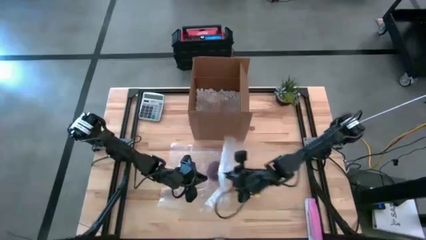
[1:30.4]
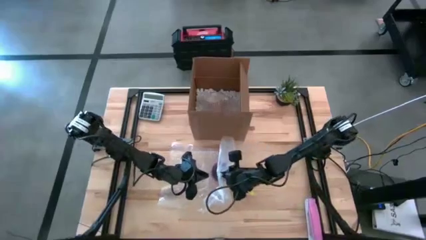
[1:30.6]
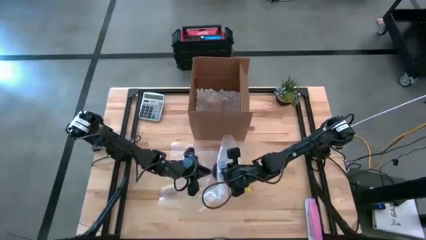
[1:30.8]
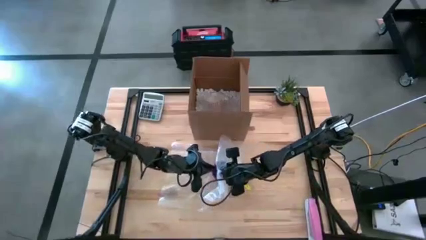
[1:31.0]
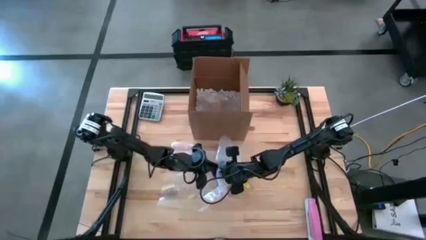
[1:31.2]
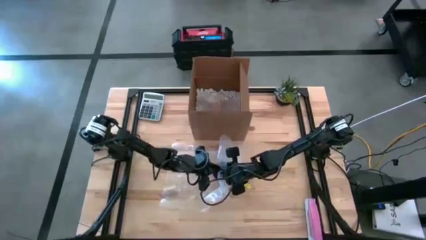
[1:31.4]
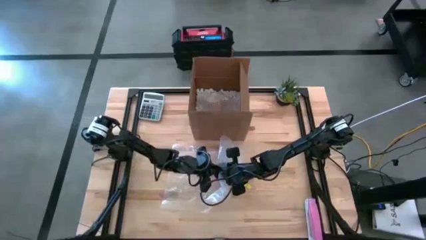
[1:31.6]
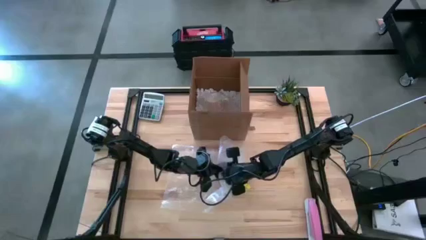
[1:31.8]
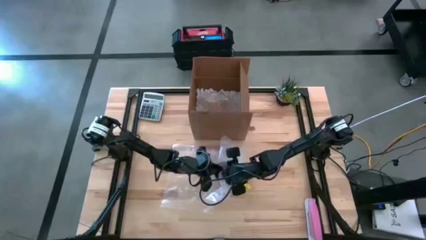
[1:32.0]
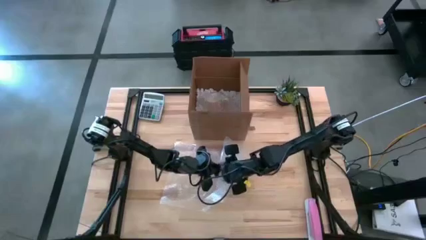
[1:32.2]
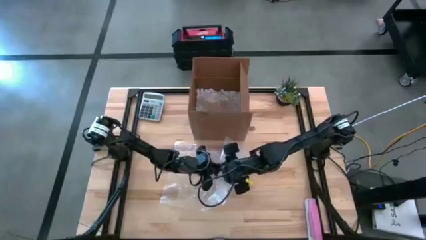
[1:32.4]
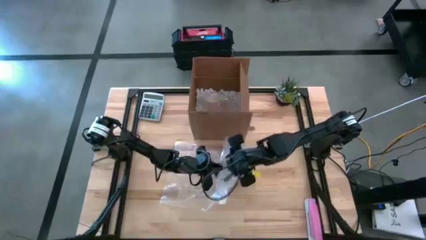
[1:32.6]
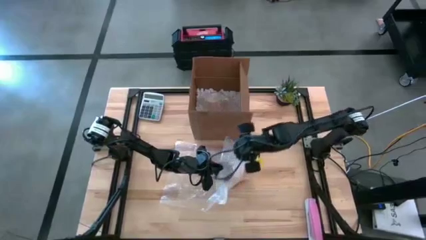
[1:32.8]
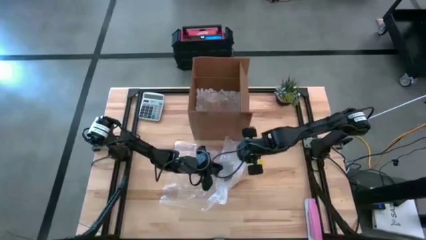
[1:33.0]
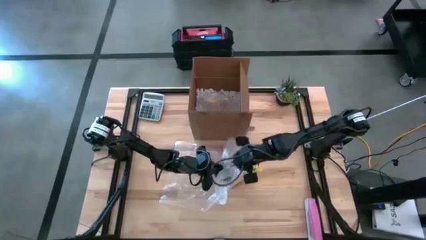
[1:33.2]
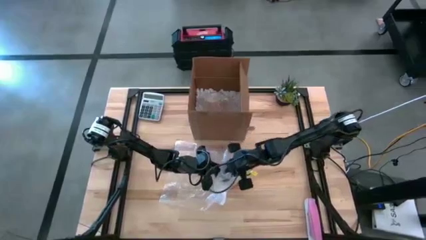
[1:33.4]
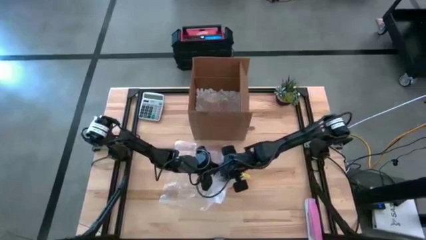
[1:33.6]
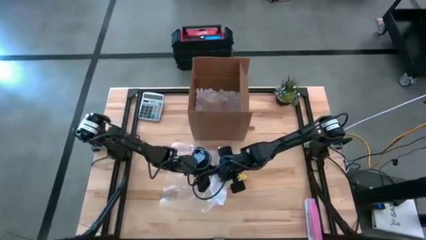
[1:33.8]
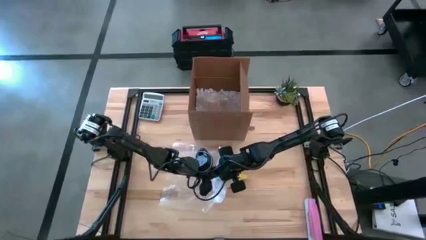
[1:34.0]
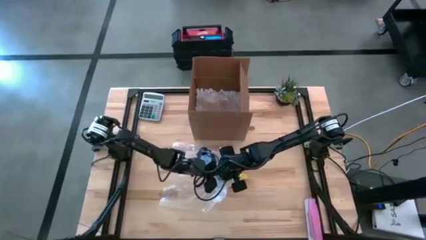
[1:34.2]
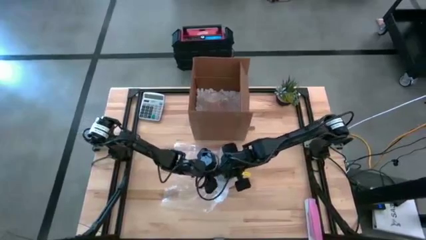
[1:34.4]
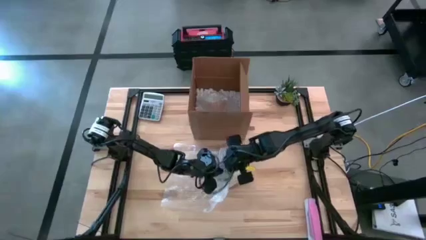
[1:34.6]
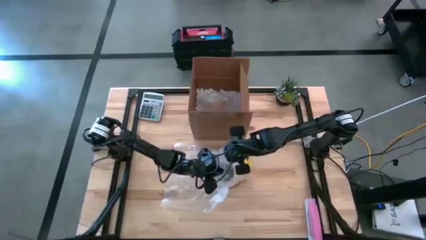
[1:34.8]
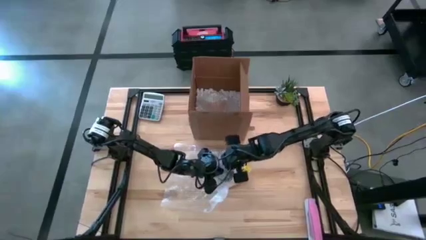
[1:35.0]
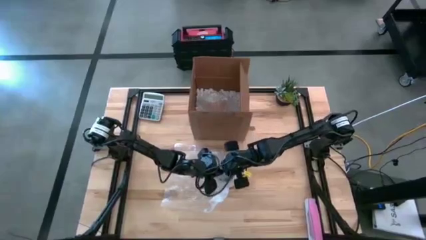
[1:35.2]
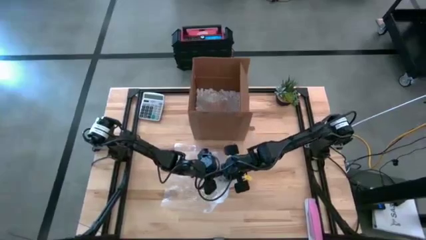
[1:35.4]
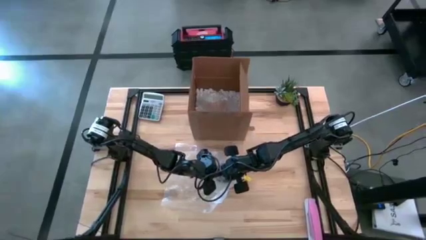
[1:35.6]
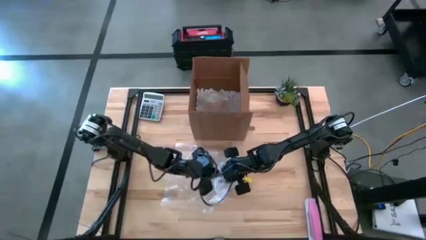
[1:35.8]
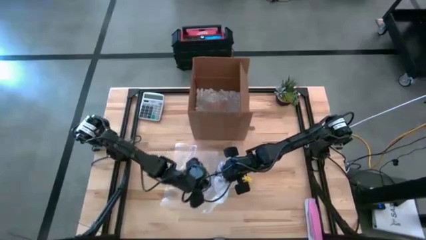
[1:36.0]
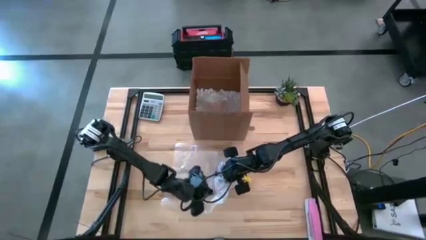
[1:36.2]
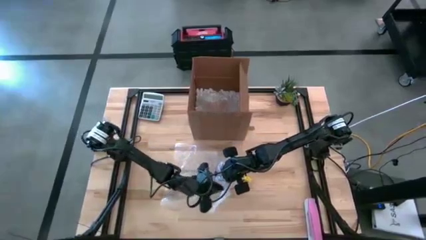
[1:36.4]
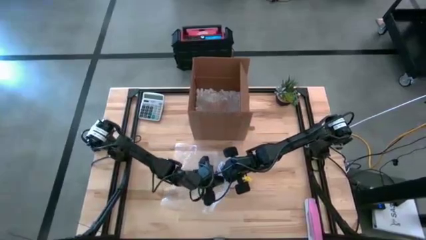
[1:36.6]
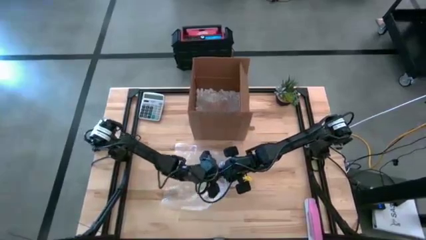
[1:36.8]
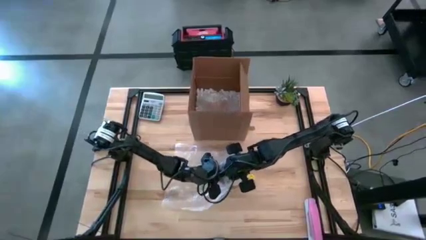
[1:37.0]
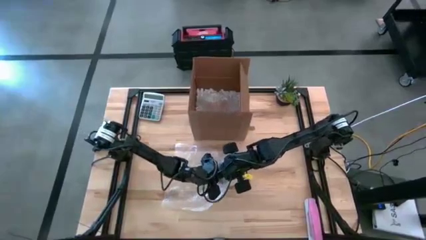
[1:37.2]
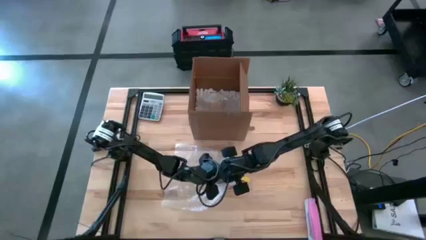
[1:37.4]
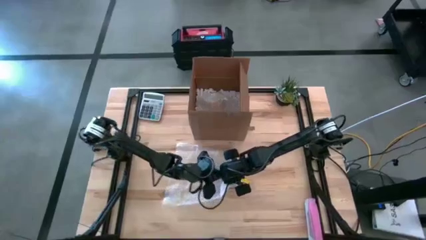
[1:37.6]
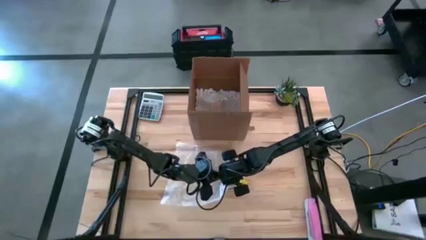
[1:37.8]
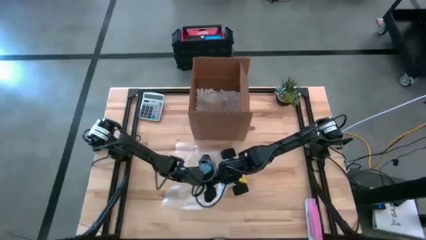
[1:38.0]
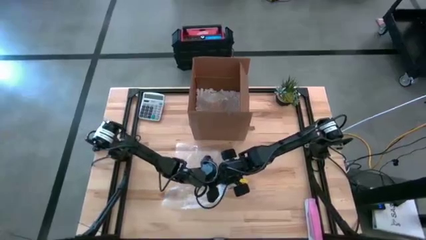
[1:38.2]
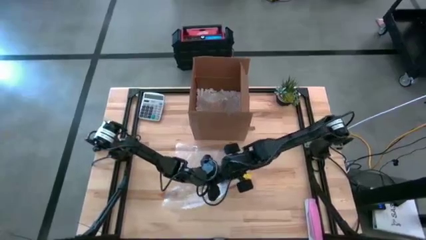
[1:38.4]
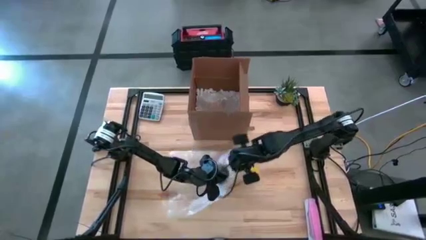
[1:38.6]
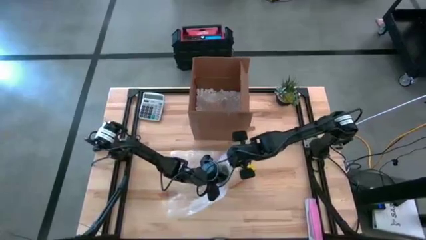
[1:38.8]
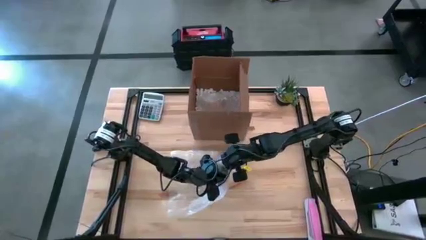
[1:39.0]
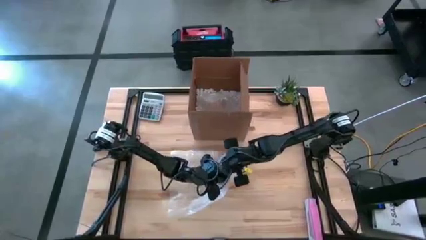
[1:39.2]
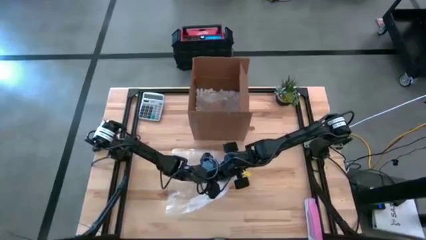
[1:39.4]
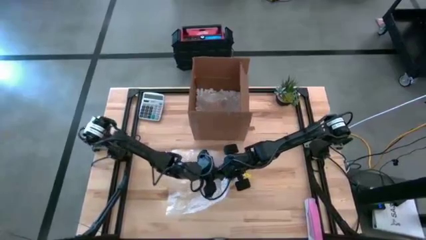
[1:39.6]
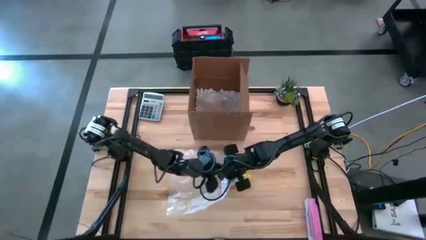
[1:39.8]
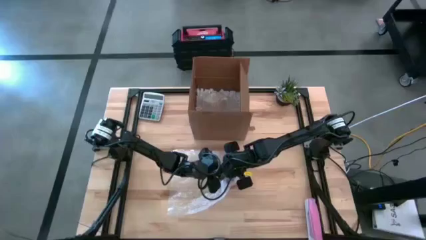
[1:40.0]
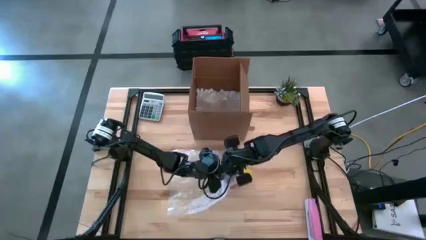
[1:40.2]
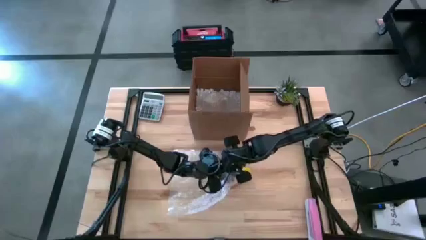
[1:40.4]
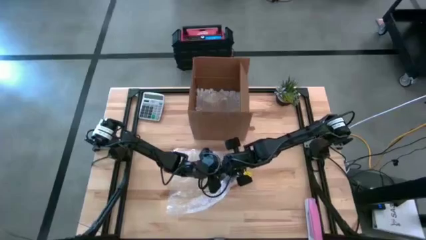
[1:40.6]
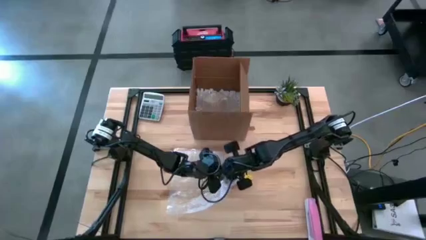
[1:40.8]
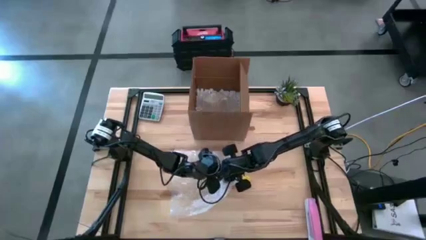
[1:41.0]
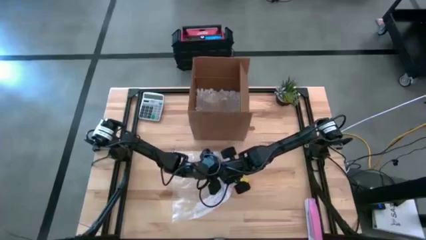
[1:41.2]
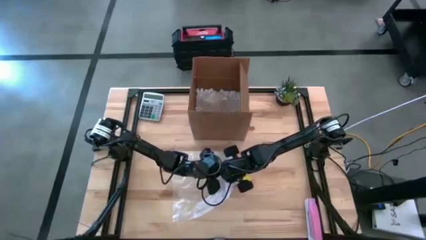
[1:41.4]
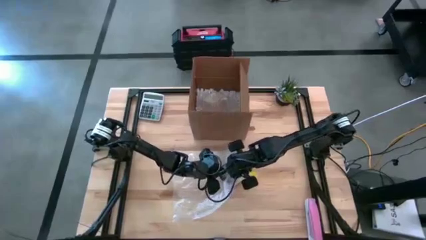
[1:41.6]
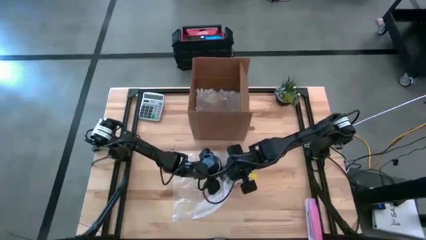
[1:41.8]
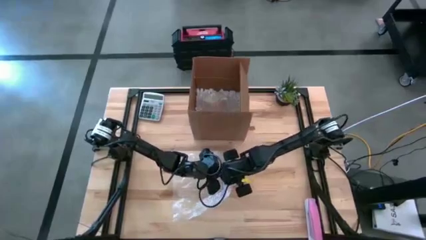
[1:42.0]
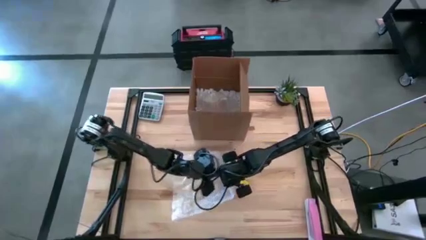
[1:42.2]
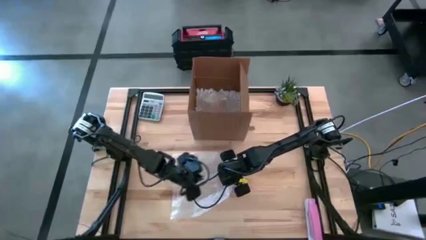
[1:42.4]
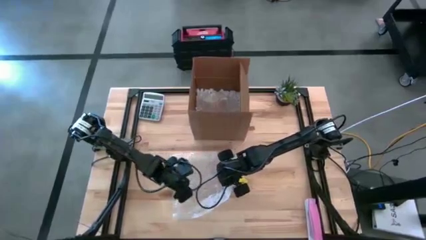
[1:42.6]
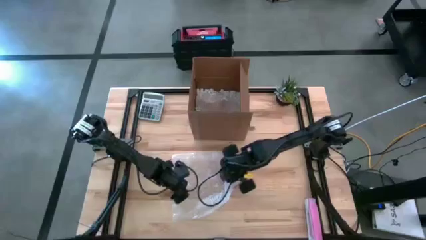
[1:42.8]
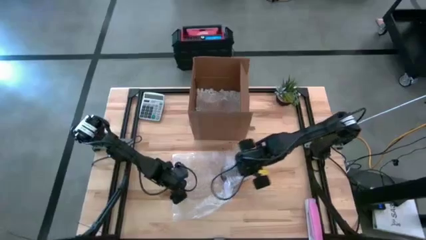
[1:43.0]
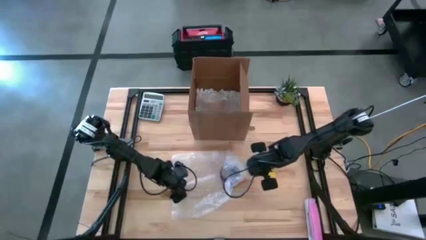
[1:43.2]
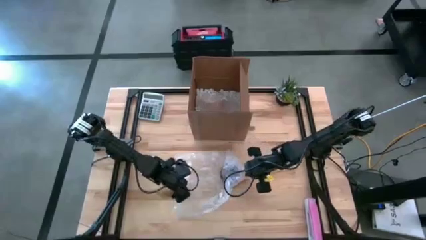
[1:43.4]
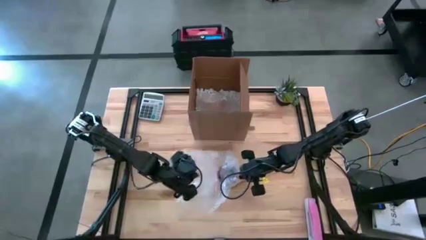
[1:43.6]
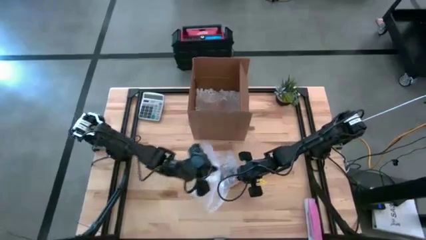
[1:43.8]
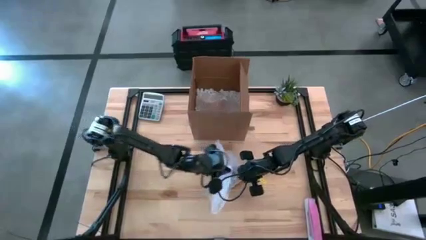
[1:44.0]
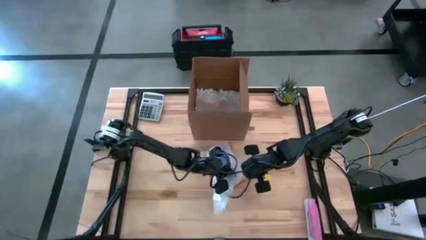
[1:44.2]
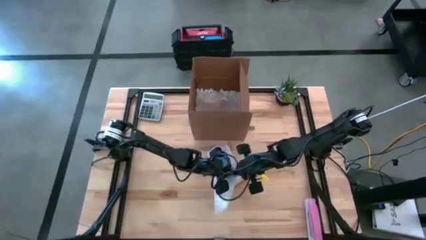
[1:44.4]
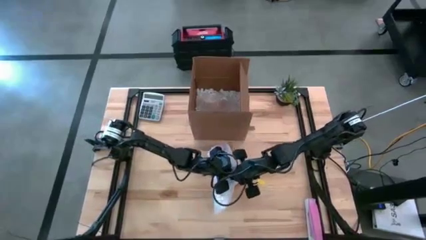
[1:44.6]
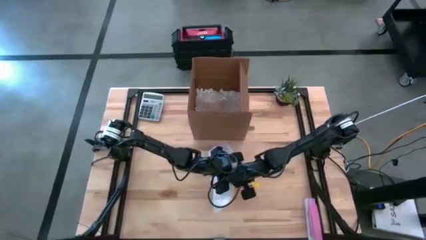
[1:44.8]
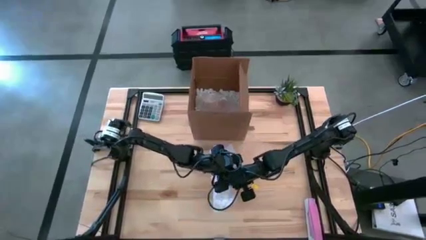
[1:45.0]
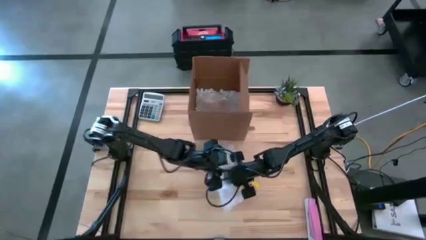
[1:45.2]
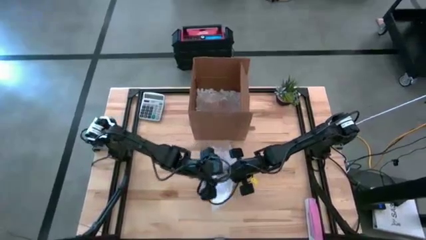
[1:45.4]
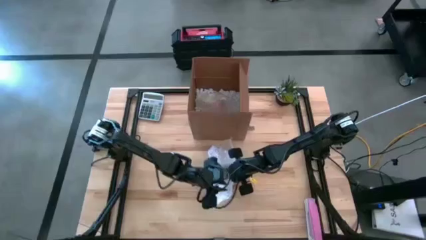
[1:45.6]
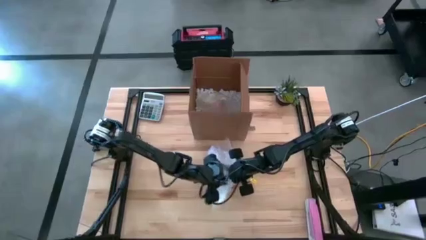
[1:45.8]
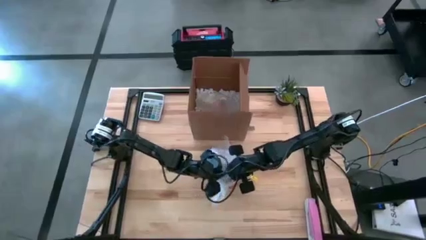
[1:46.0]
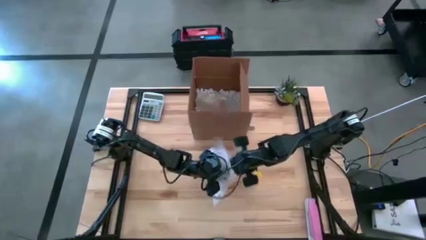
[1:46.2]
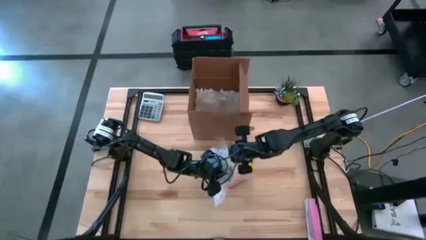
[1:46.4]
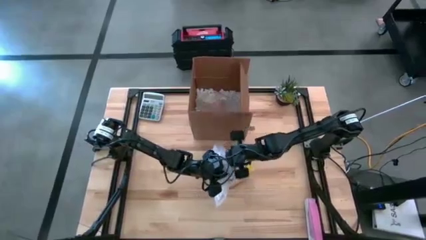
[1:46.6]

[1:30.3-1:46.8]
Task: wrap mug
Wrap the purple mug with bubble wrap

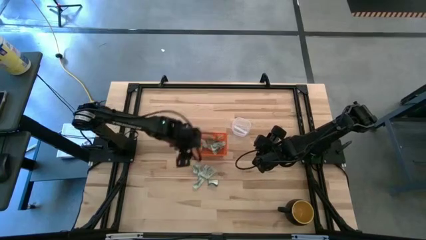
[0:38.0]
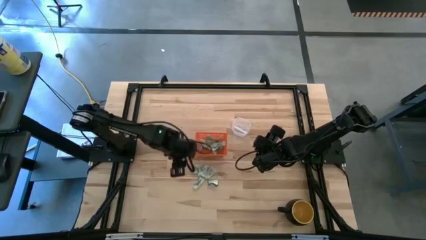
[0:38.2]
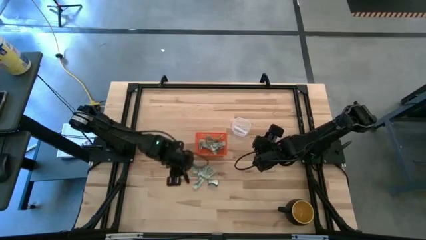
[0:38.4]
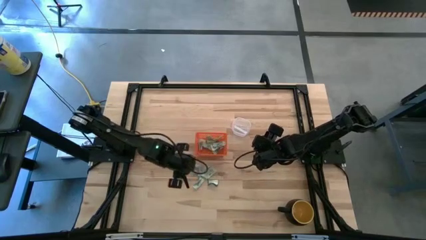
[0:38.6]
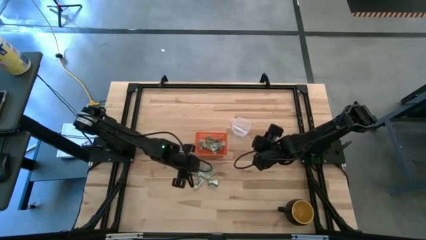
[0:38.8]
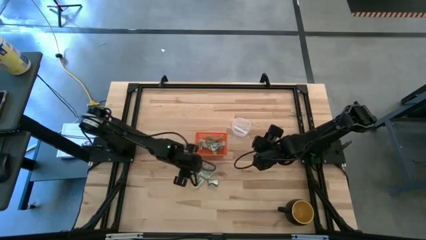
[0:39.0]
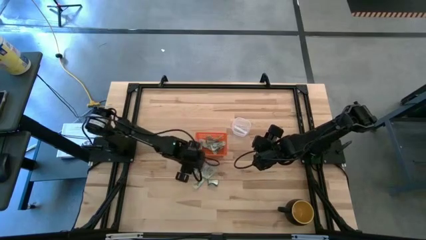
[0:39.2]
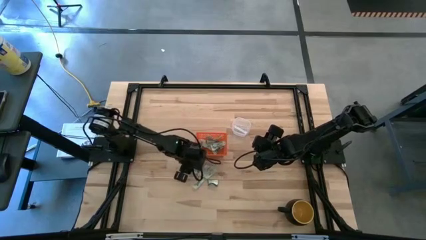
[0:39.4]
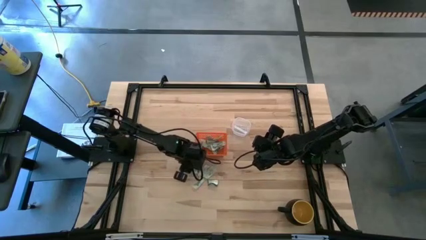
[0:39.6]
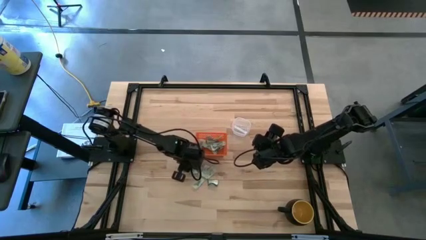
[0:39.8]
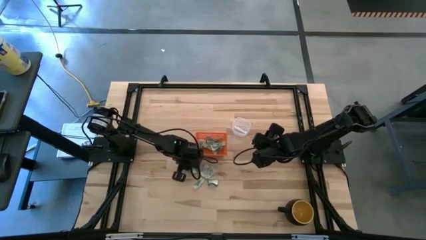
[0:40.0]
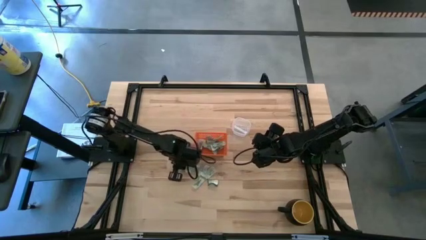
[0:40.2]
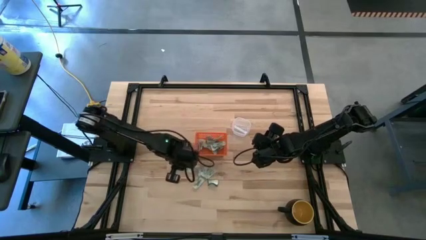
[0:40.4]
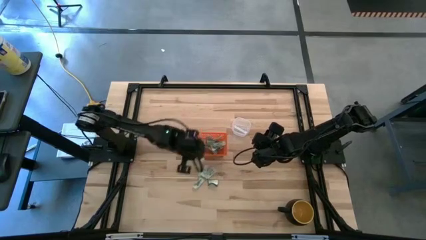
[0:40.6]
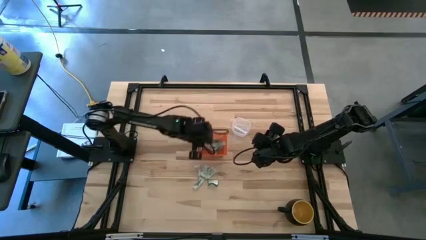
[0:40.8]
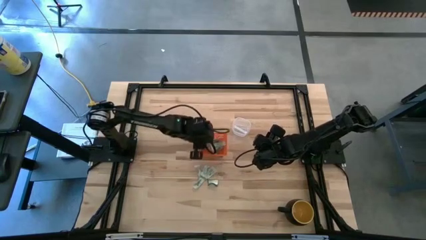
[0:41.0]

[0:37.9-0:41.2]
Task: Pick and place Stevia / Truvia into bins
Put the stevia packet into the basket
